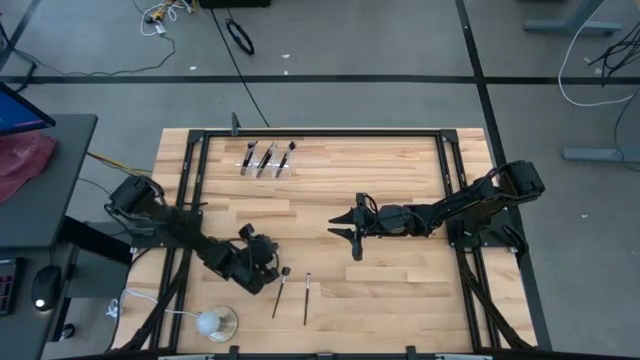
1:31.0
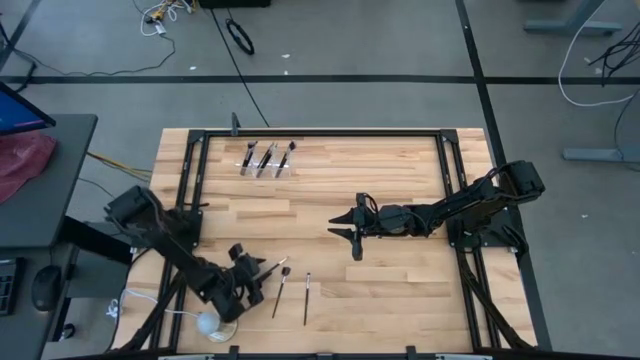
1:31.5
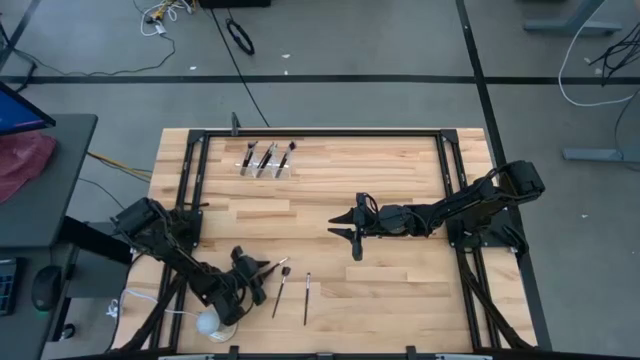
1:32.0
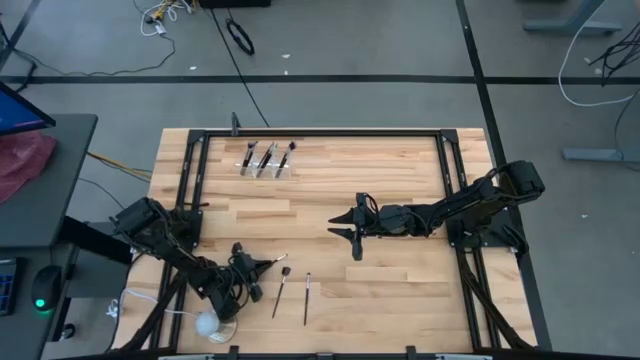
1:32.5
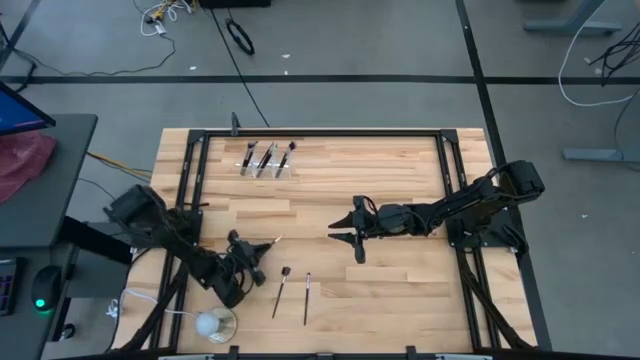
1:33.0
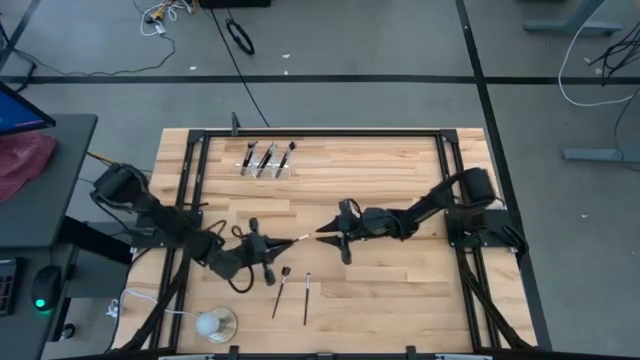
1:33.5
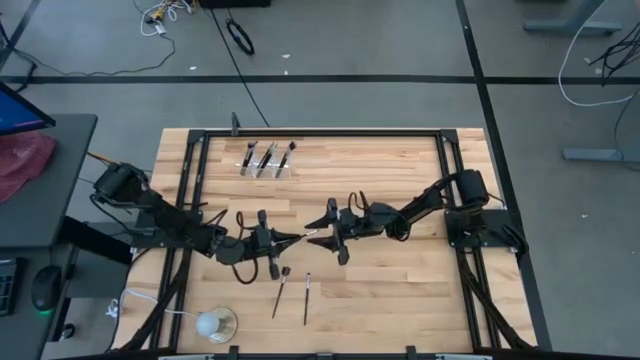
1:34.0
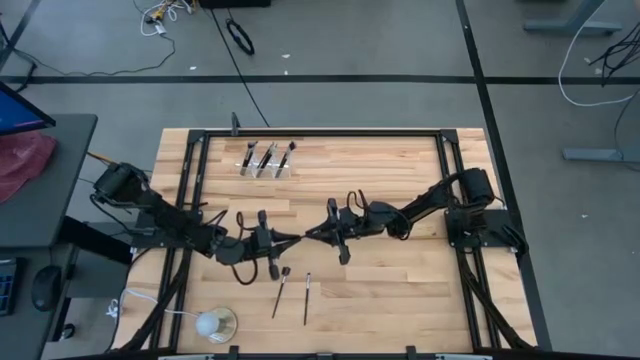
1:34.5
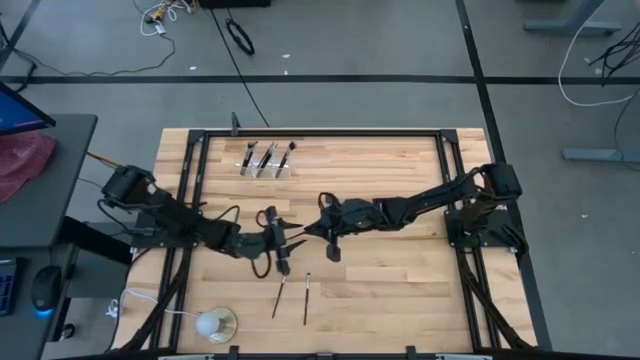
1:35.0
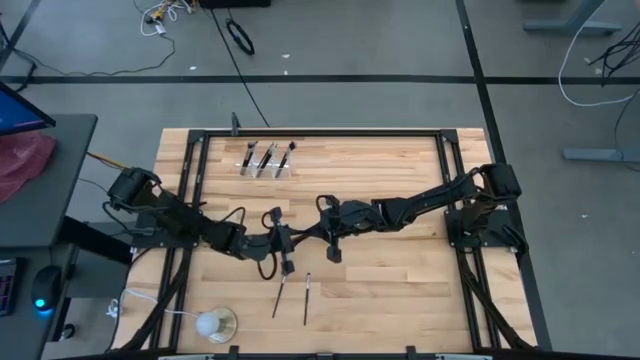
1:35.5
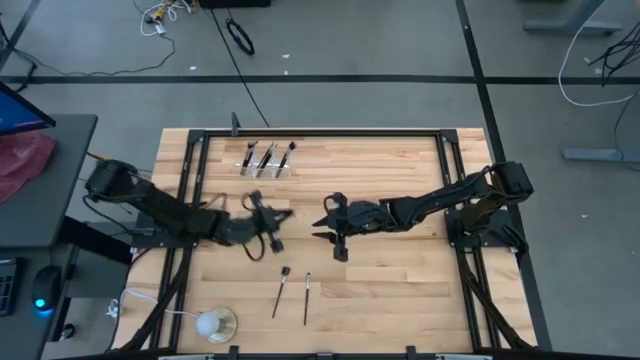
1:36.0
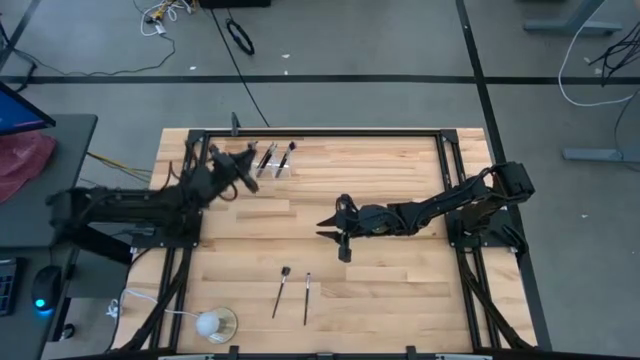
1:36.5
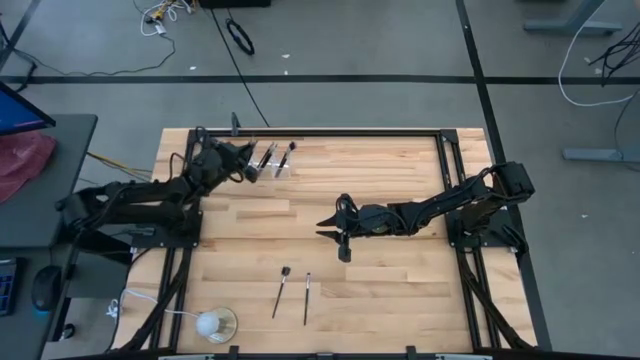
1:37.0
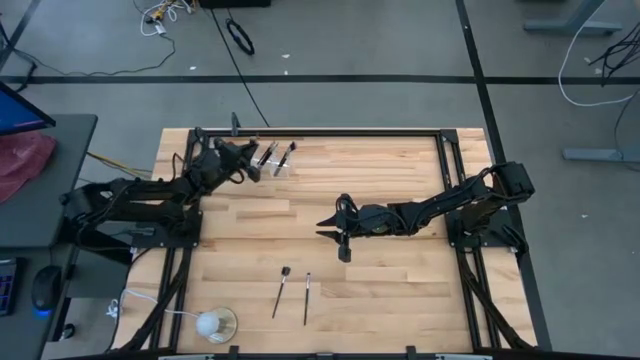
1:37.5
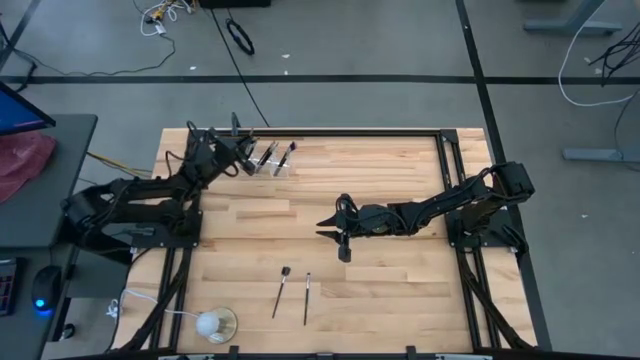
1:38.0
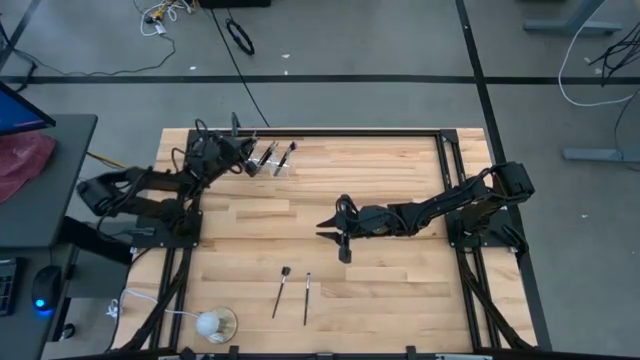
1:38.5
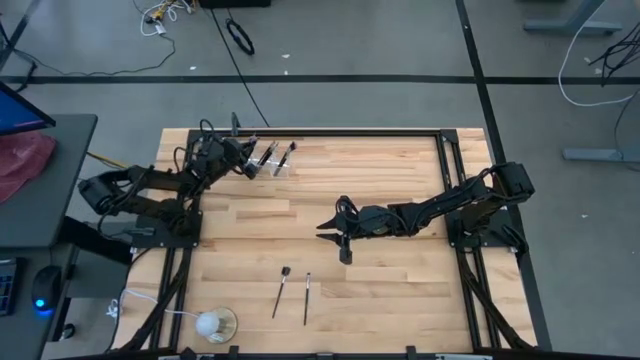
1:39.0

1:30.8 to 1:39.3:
Task: Put items in baskets/containers
Put the eyeshadow brush into the left section of the transparent organizer

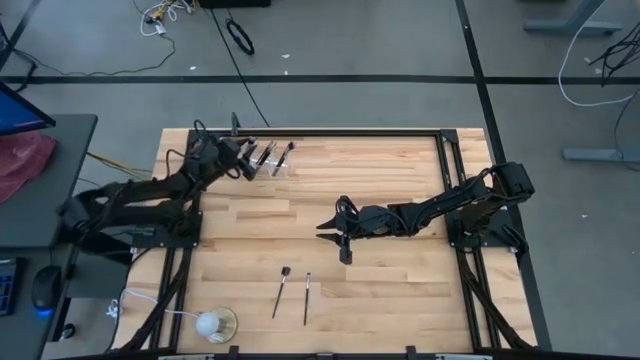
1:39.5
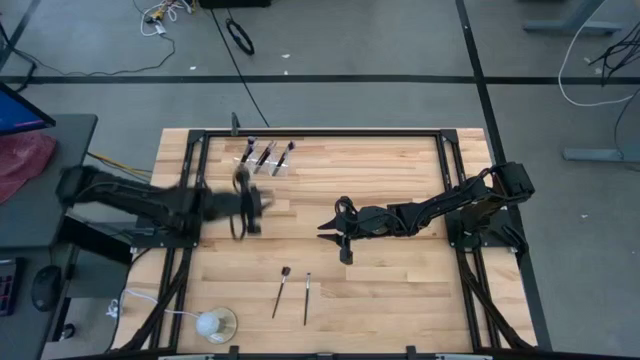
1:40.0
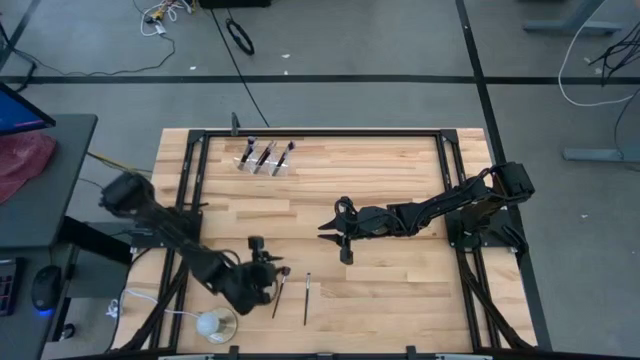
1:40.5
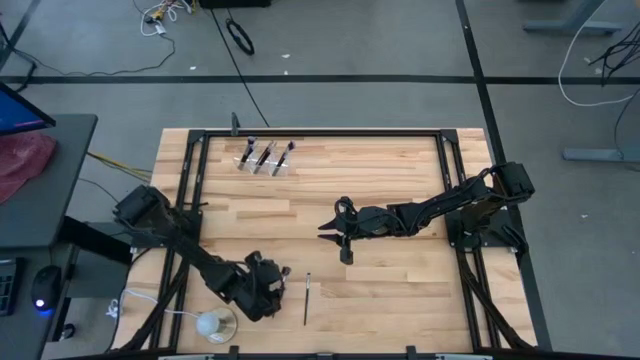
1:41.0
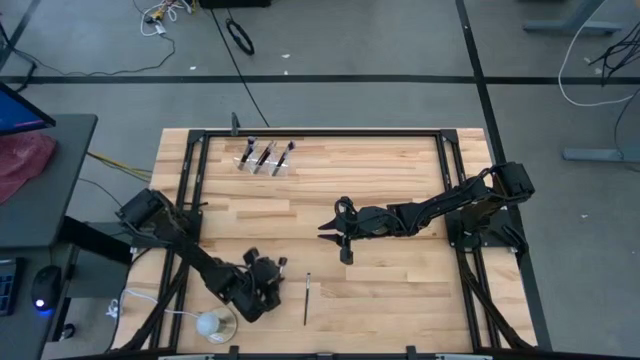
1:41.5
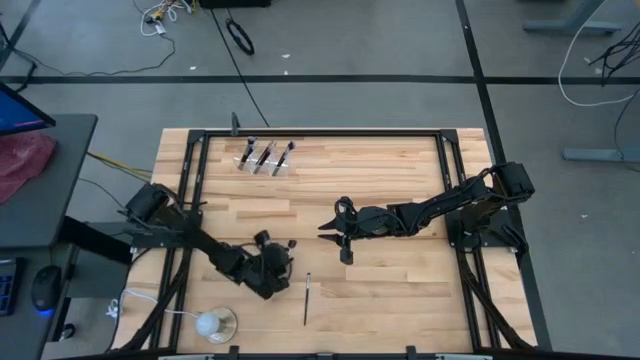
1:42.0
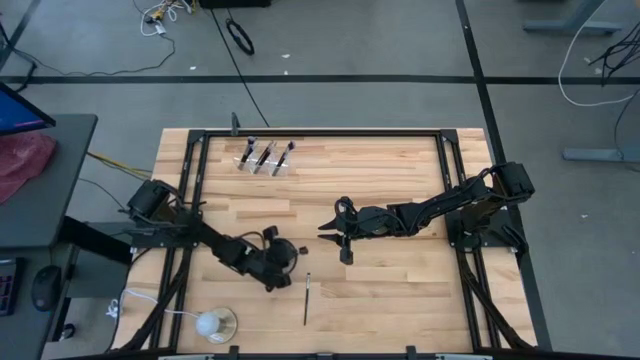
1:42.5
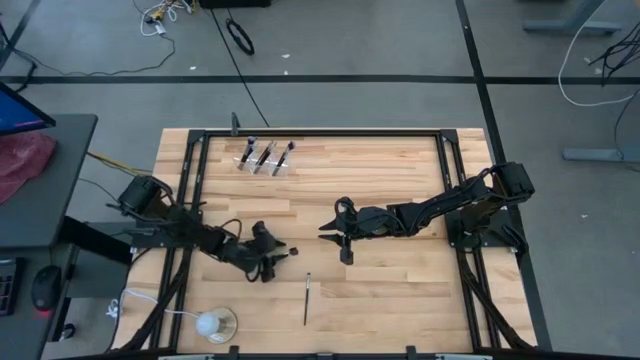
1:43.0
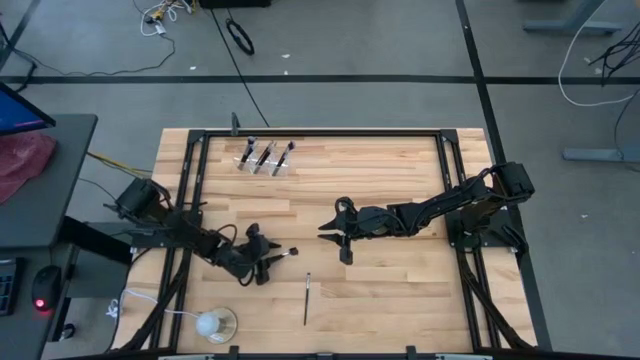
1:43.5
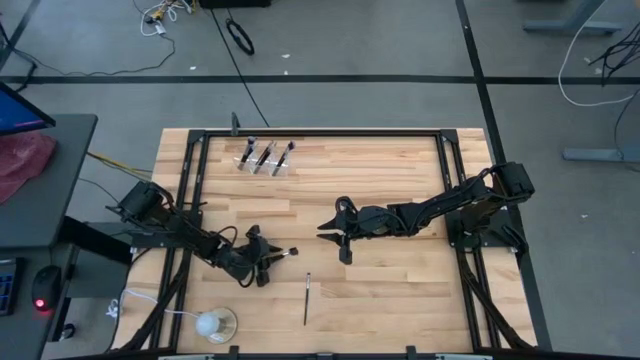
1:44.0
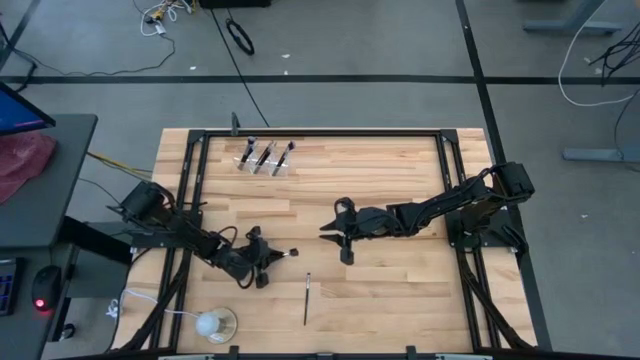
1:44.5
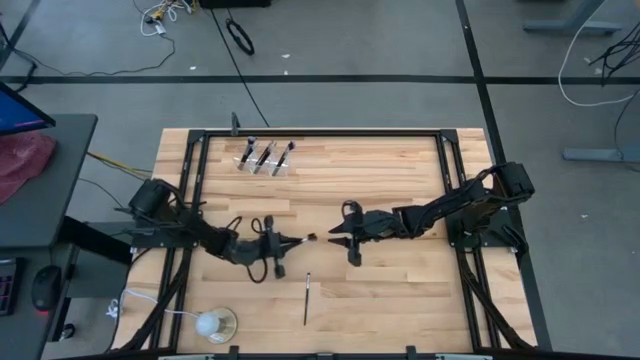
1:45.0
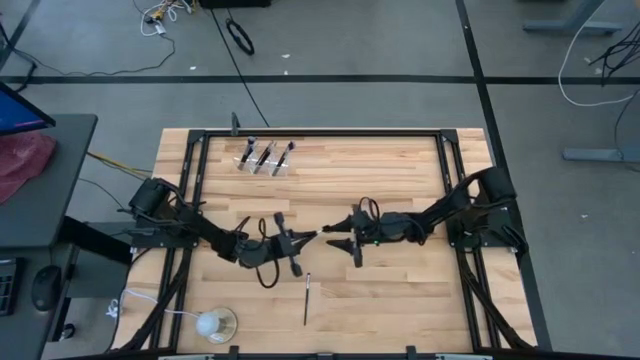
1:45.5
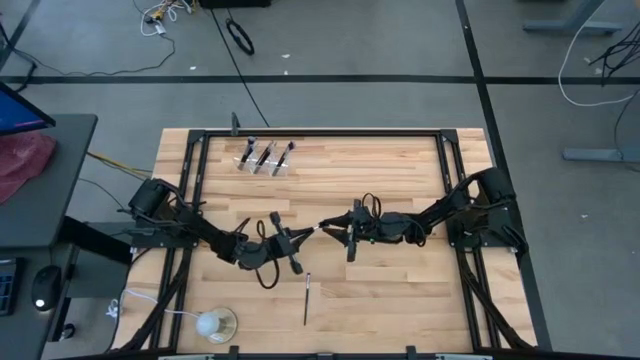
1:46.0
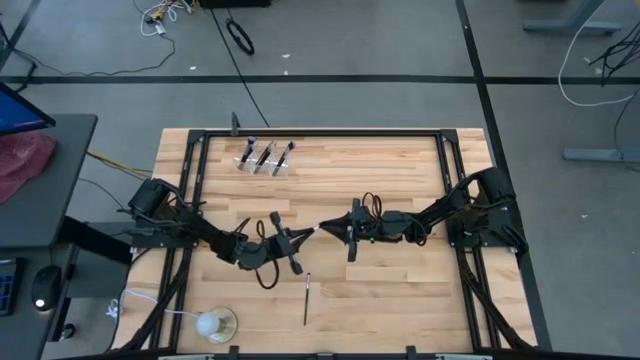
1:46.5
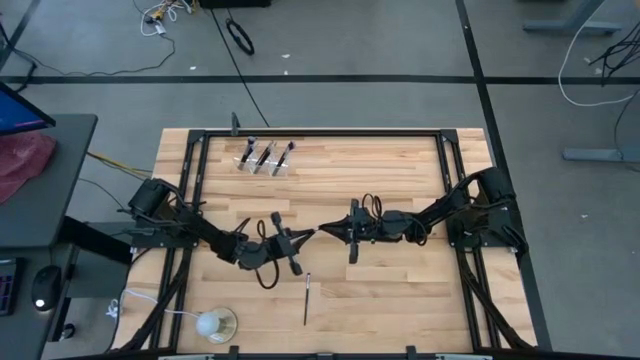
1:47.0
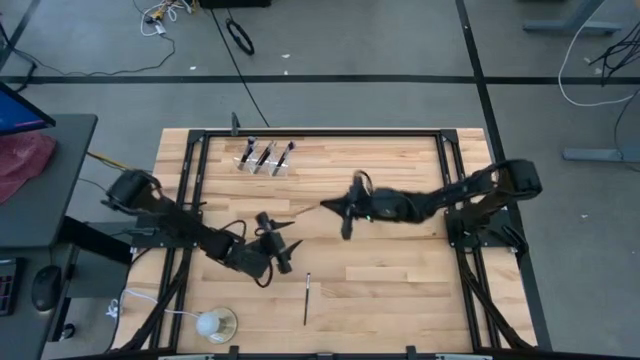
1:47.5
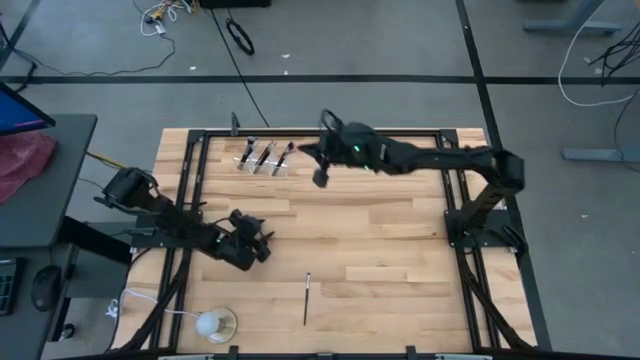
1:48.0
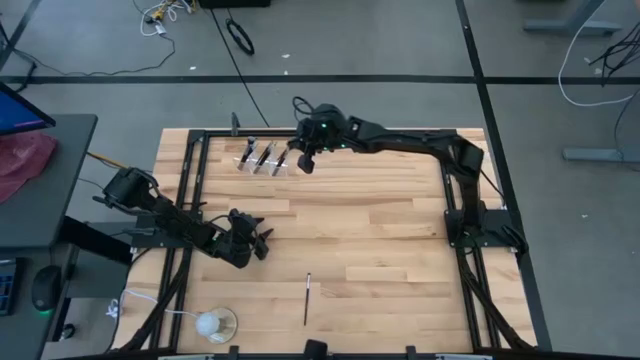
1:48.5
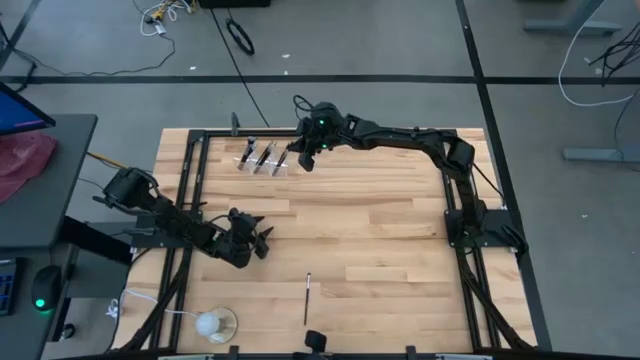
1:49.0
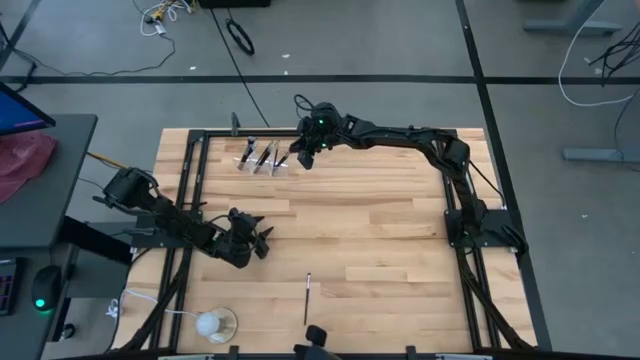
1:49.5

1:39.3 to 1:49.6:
Put the lash brush into the right section of the transparent organizer

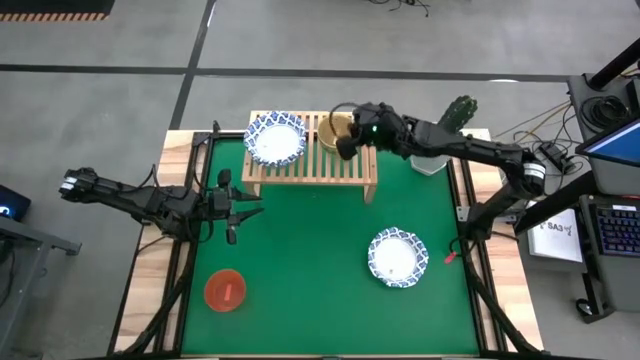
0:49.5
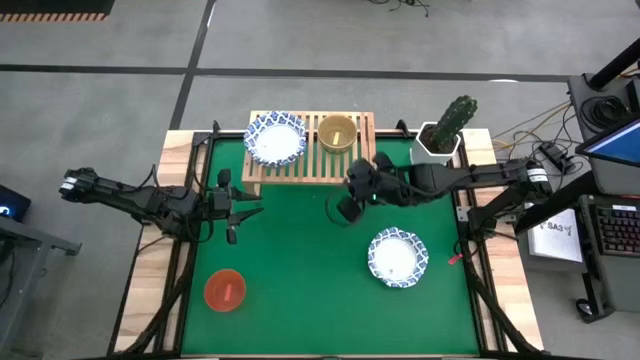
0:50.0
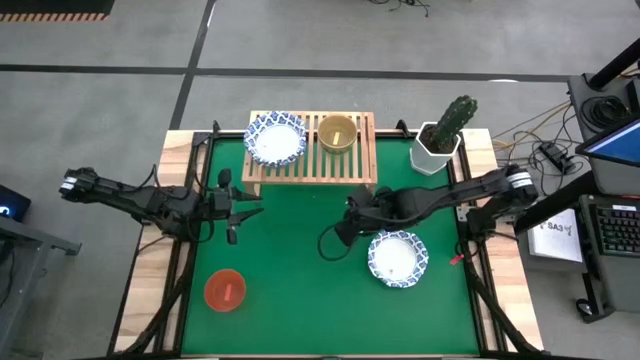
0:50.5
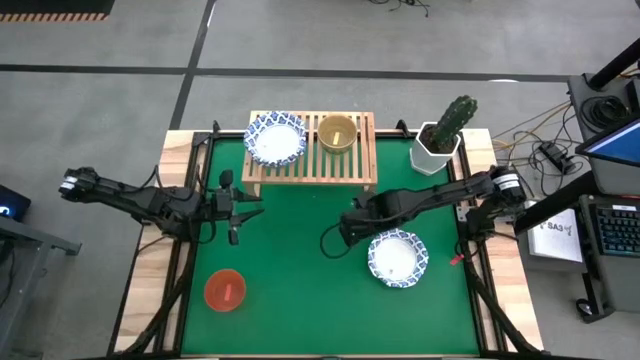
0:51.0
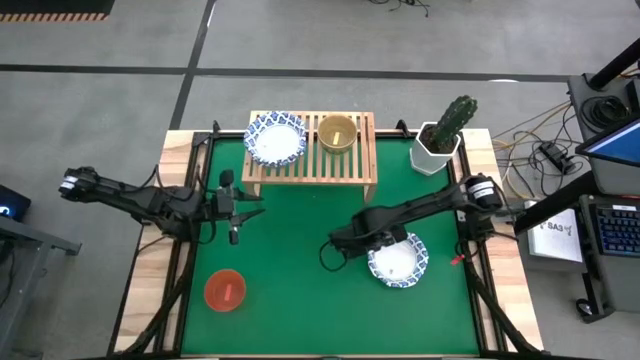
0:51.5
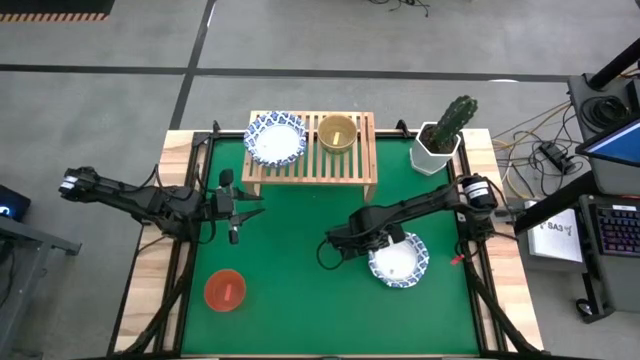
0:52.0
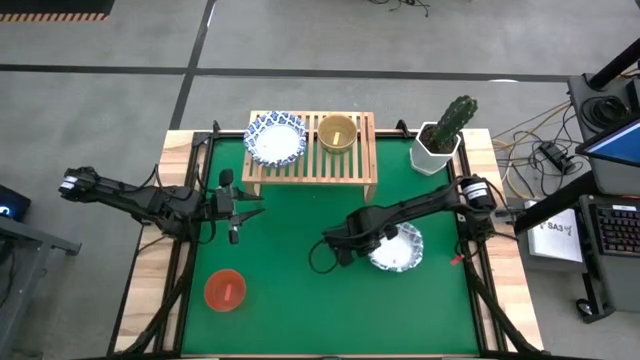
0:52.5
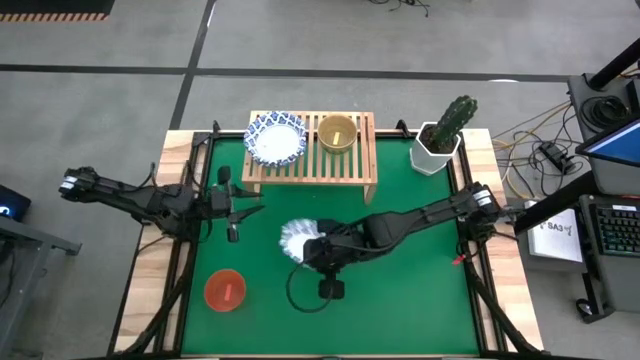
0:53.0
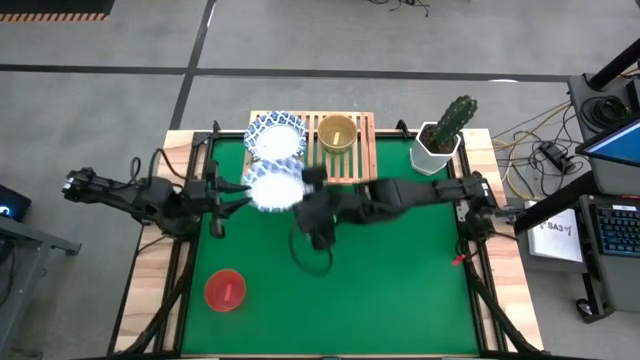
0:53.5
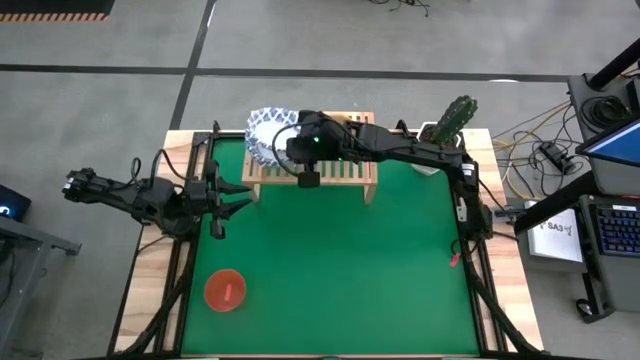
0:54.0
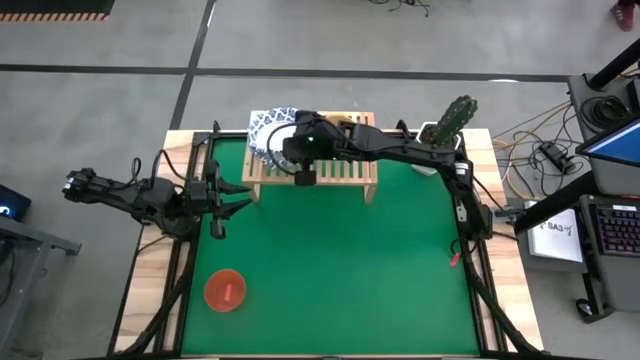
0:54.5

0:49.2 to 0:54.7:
Task: Place and stack bowls onto a shelf
Stack the blue patterned bowl on top of the blue patterned bowl on the shelf
